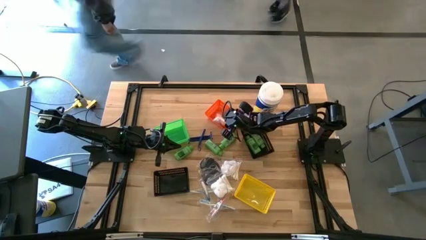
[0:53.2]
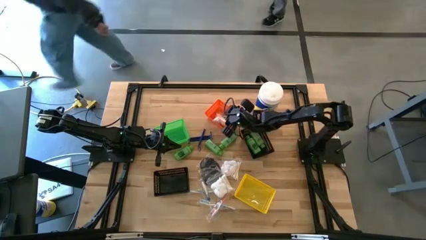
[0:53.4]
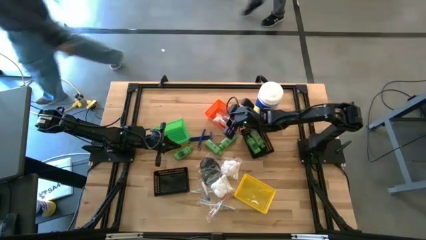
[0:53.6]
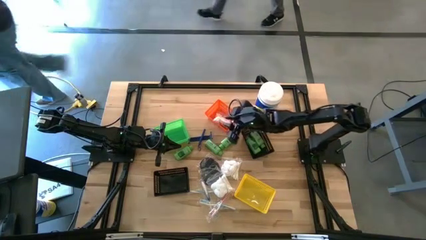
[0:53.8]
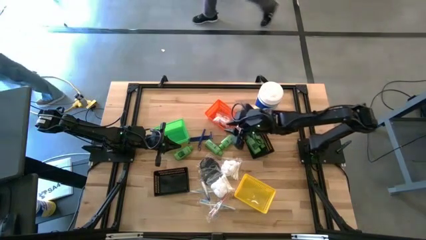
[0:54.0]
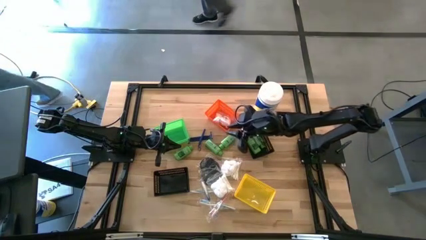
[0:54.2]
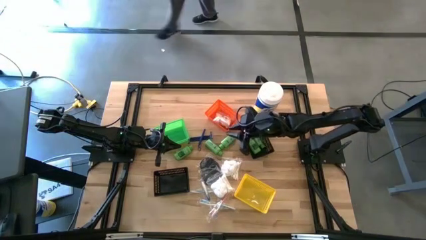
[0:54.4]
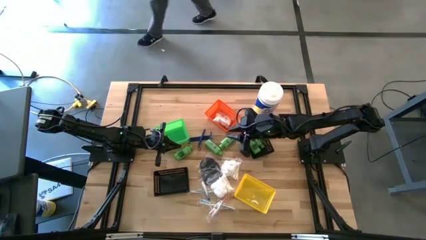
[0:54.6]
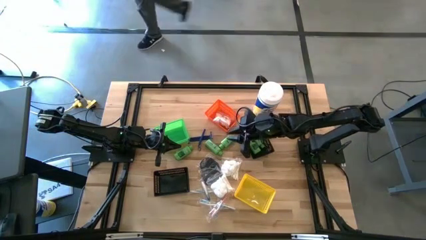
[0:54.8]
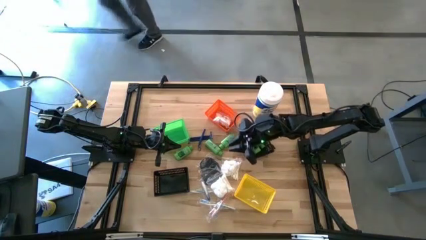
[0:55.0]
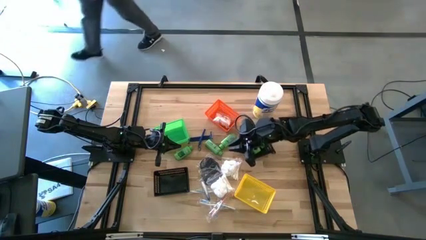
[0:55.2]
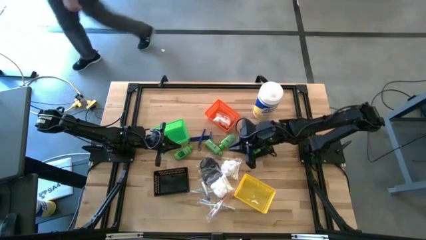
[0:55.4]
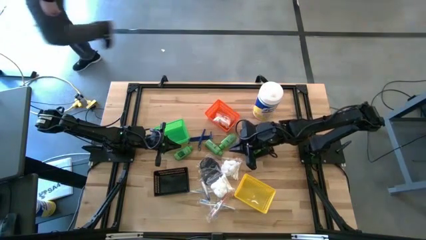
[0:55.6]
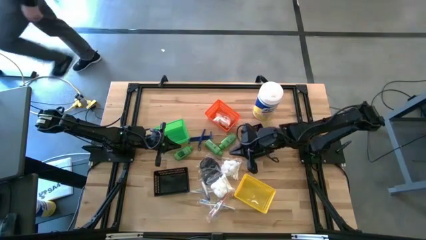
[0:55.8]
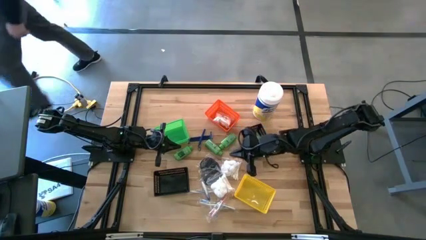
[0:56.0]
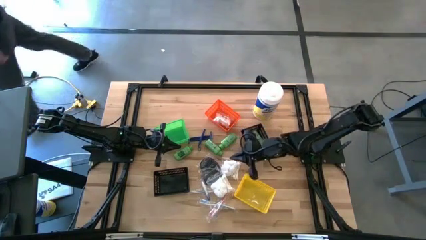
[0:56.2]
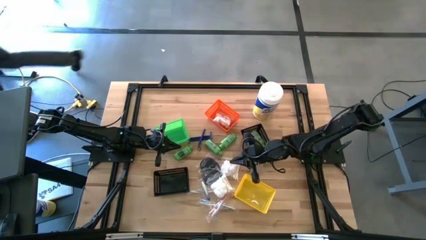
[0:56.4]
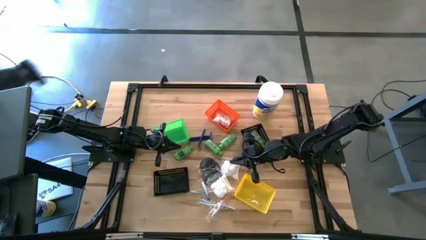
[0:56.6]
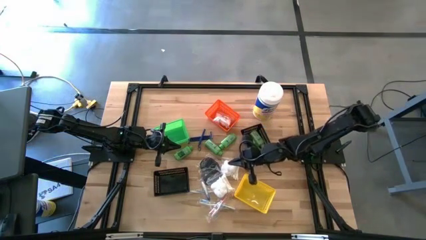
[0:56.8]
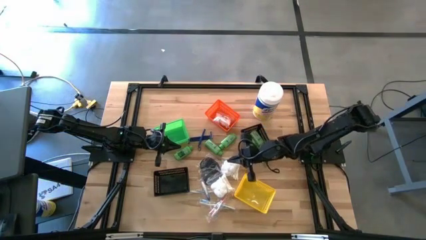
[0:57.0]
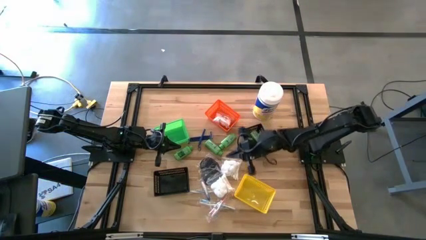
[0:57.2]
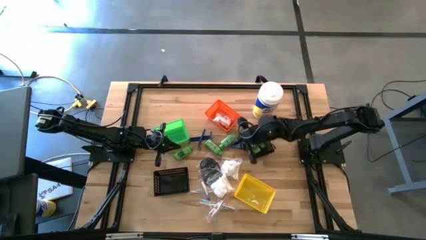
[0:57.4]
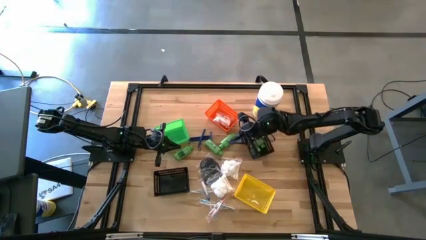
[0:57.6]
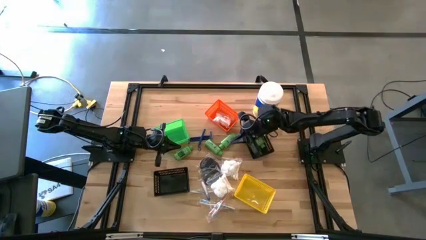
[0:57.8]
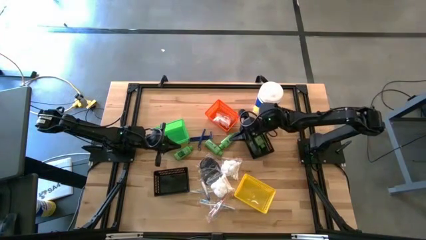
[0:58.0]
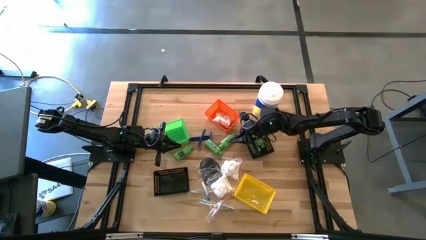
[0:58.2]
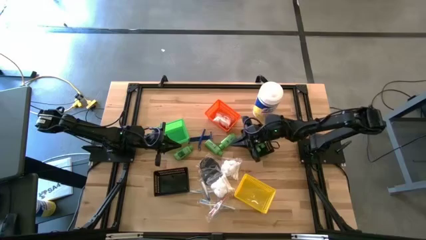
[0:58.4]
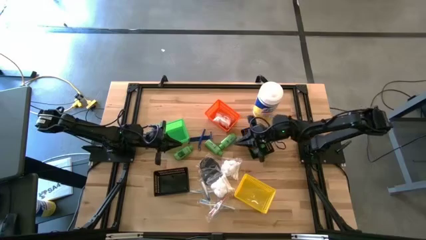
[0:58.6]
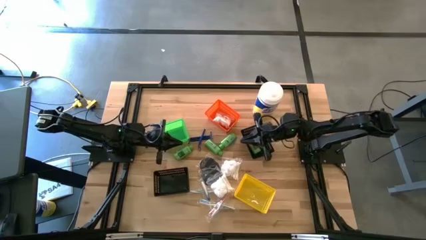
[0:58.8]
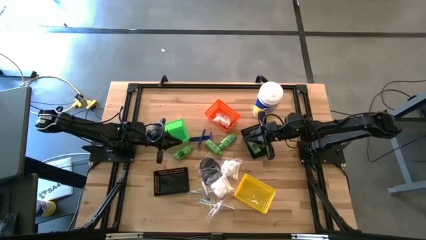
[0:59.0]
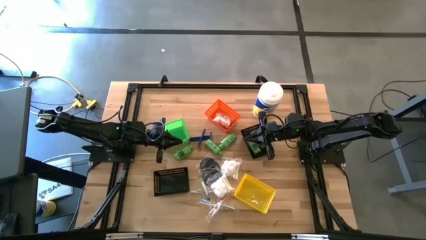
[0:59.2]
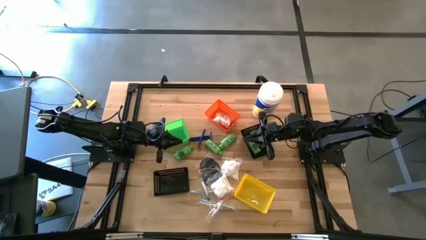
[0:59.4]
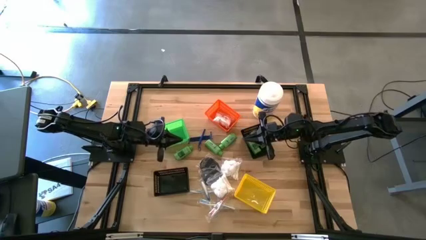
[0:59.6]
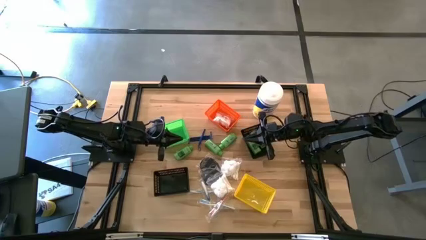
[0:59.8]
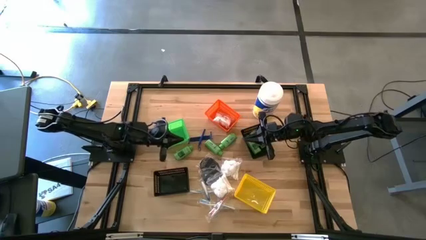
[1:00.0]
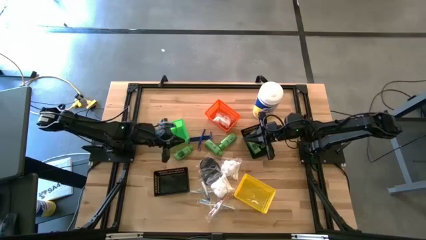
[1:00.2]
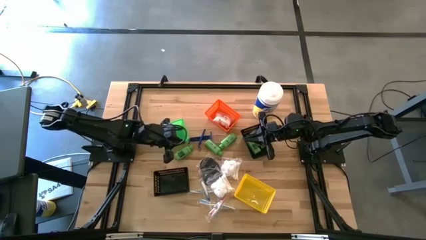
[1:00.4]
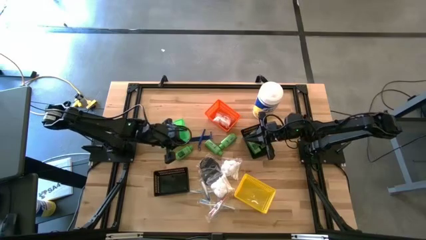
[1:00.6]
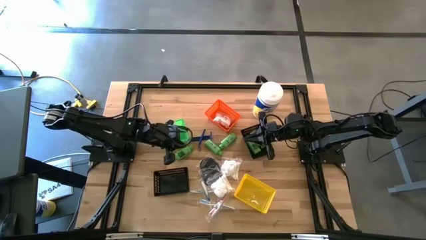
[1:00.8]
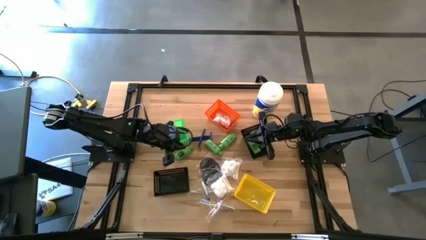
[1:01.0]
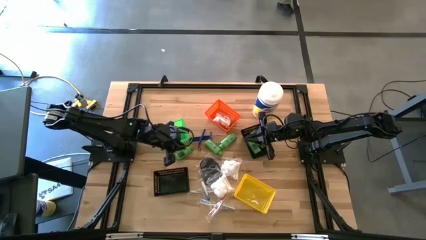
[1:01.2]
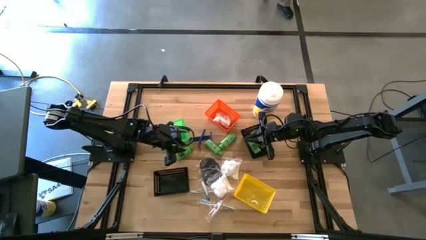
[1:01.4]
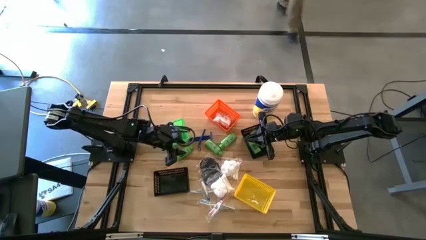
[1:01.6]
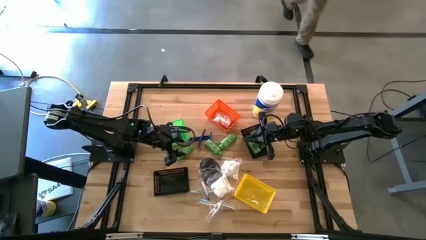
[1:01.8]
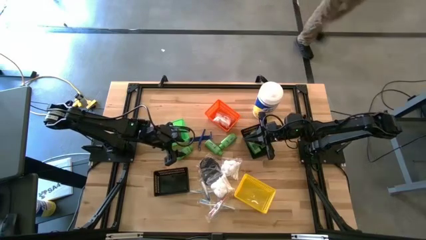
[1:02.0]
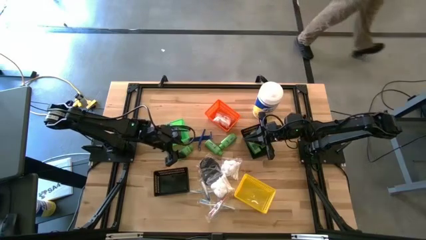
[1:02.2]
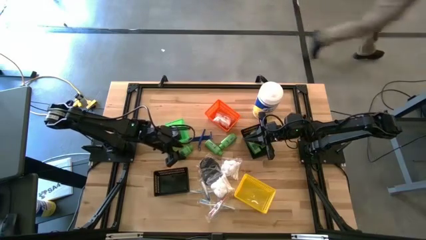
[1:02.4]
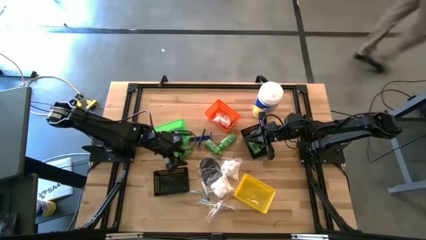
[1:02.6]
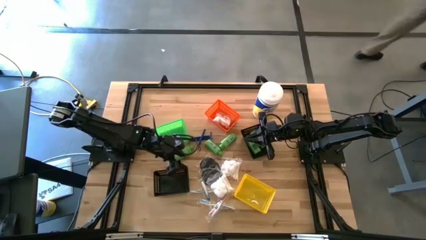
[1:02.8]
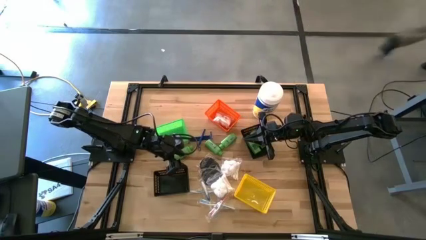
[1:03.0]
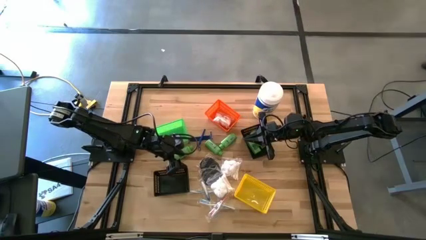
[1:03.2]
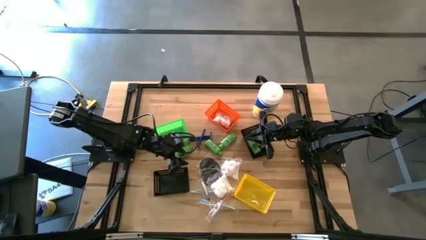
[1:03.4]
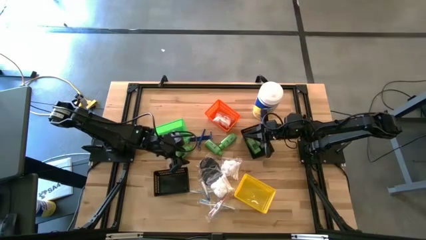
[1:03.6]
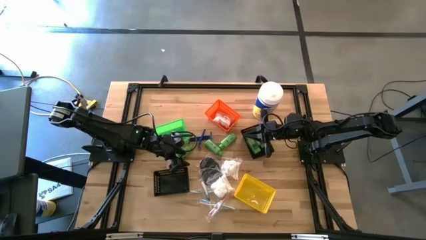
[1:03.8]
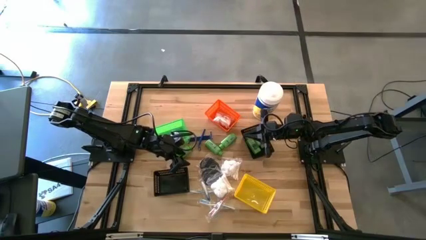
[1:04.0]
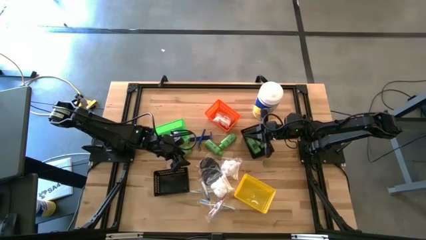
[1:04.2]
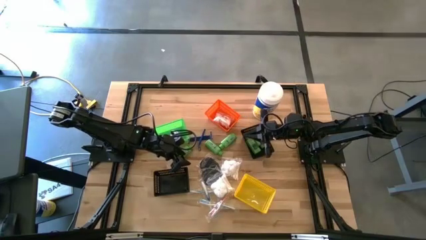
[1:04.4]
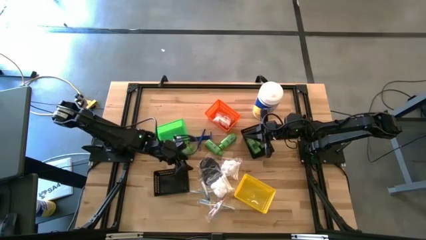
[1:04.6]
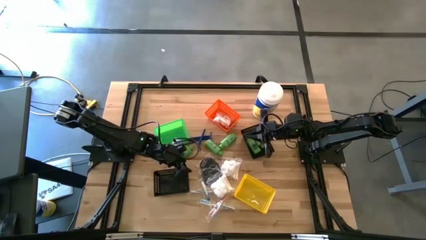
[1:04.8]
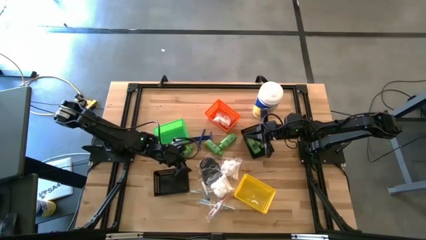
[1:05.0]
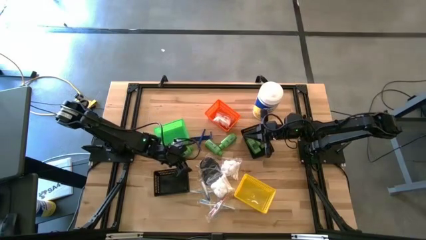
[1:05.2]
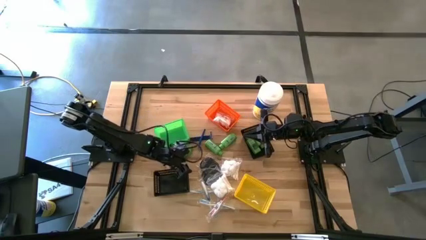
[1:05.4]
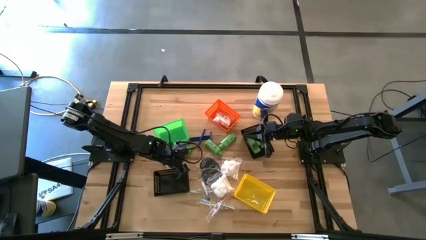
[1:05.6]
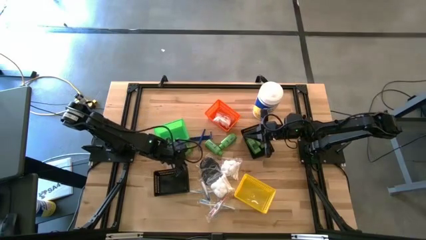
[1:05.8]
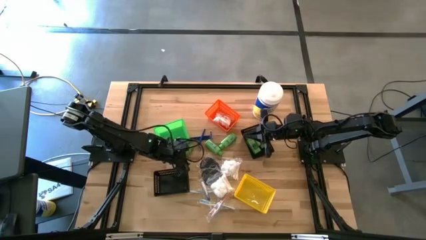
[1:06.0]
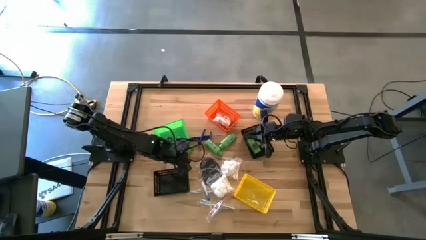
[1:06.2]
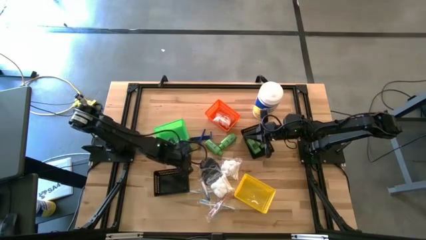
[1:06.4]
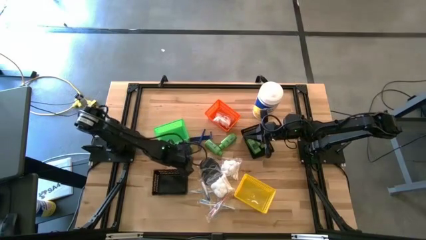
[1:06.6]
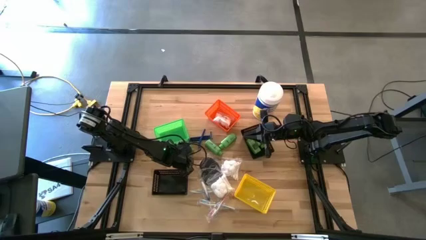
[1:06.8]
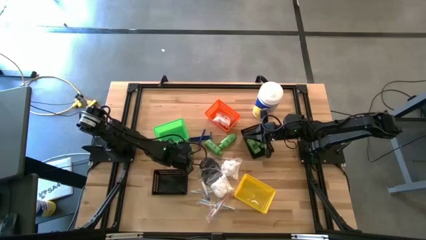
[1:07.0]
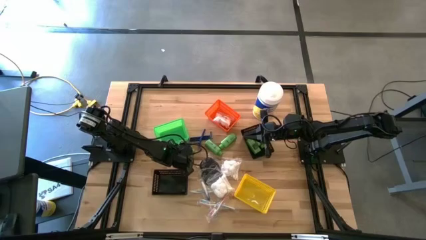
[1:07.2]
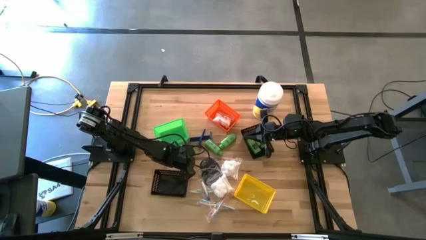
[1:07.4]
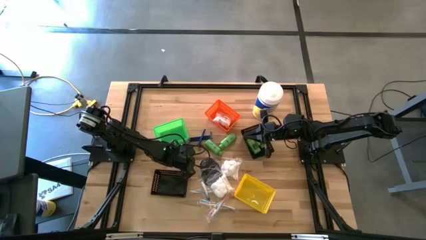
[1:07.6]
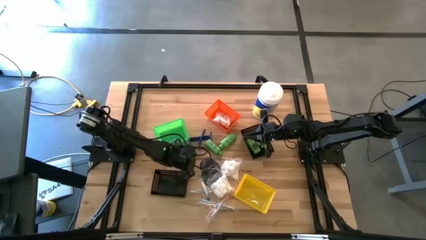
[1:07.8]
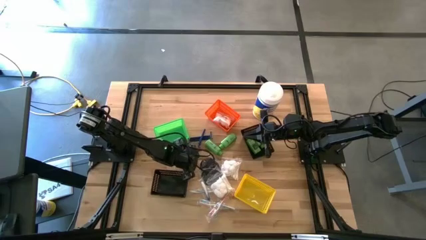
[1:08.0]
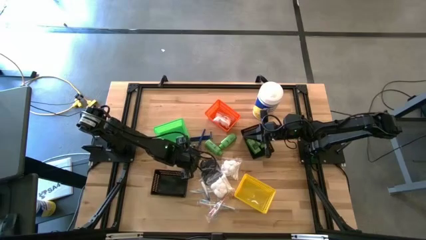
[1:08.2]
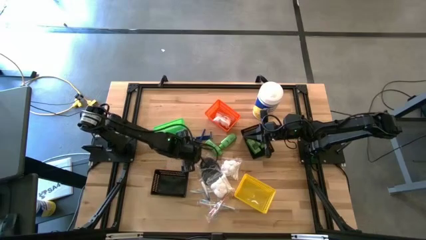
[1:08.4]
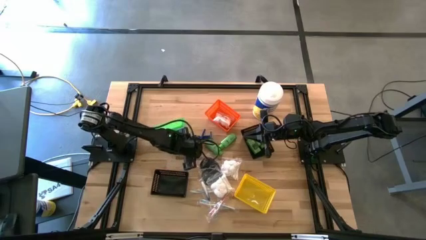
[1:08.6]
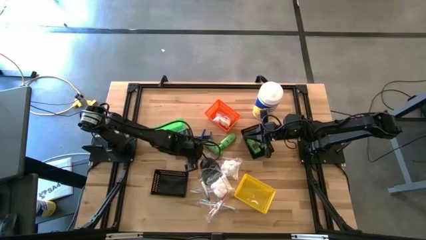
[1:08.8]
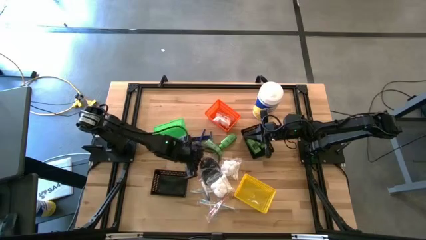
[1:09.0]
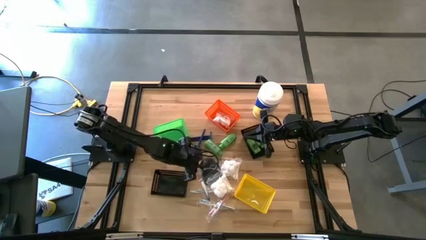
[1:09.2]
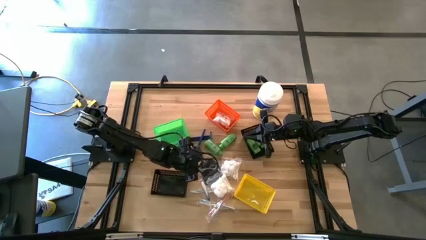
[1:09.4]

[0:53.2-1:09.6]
Task: Pick & Place Travel size toiletries
Put the green shampoo into the top black bin
